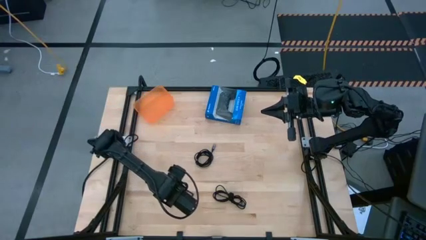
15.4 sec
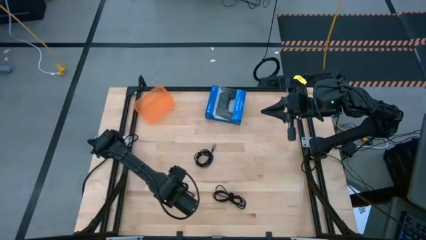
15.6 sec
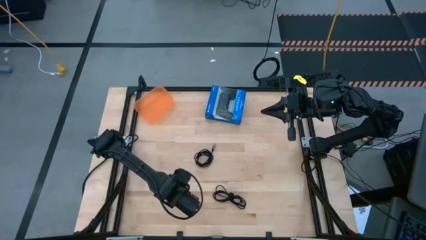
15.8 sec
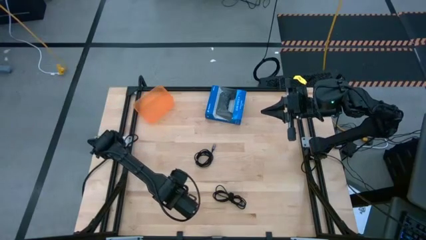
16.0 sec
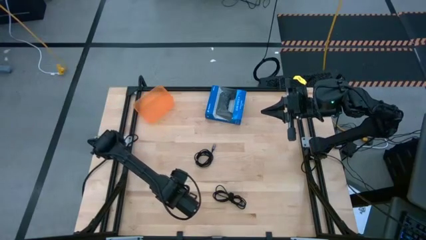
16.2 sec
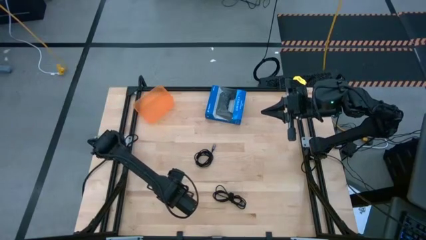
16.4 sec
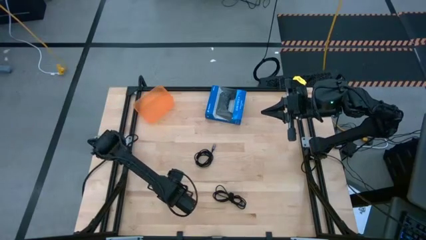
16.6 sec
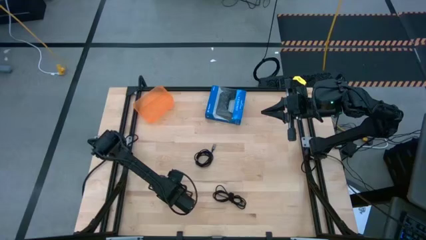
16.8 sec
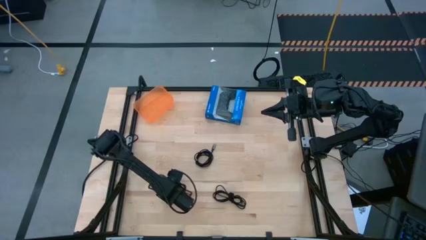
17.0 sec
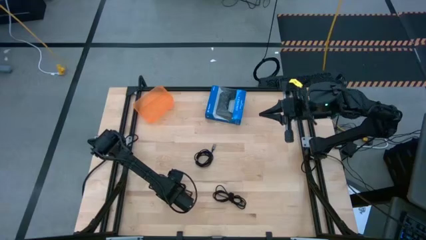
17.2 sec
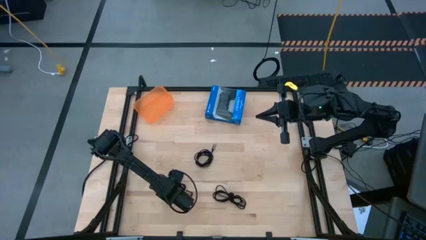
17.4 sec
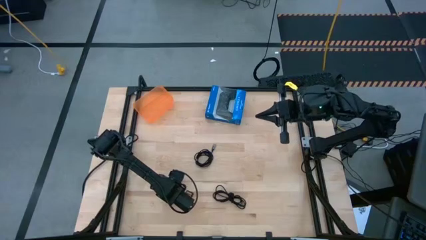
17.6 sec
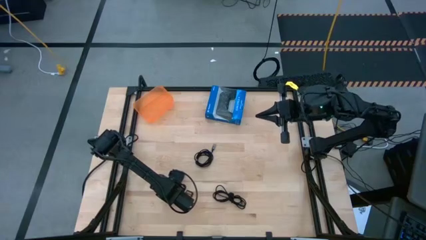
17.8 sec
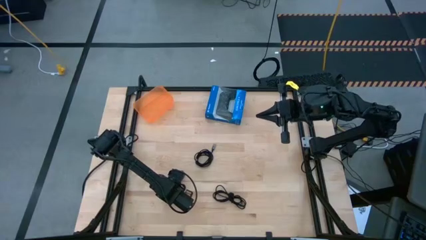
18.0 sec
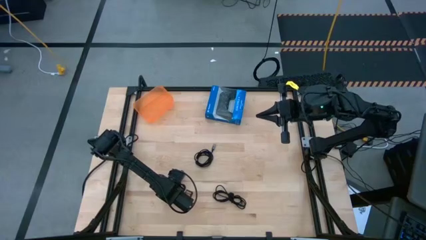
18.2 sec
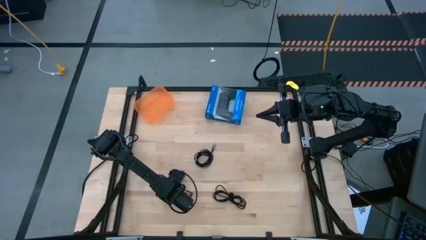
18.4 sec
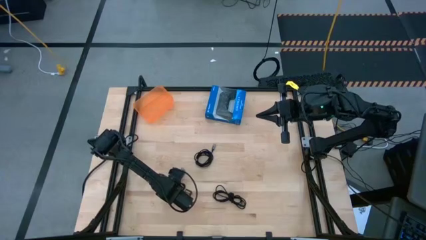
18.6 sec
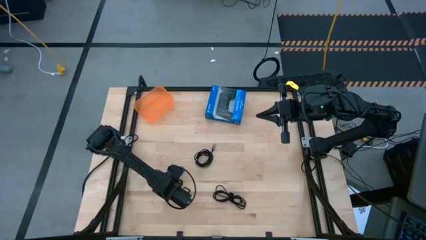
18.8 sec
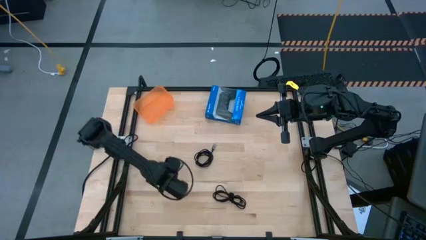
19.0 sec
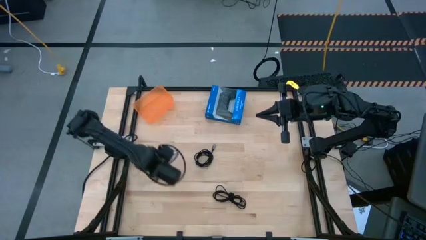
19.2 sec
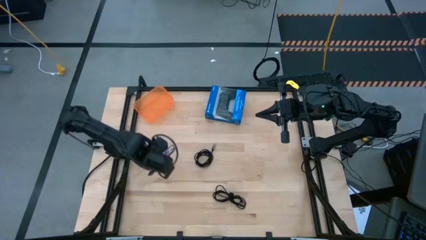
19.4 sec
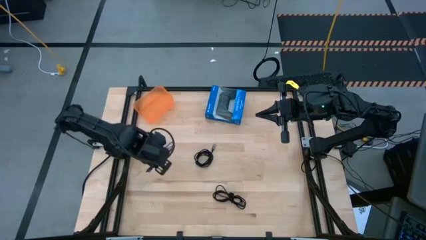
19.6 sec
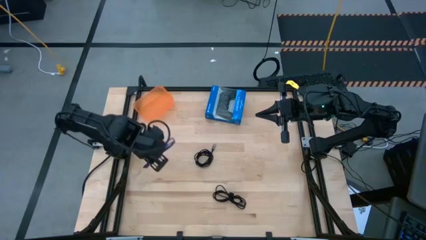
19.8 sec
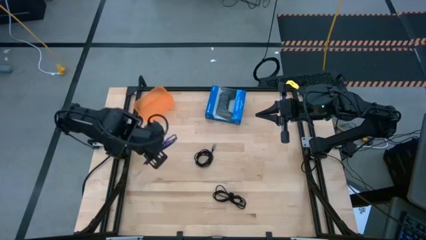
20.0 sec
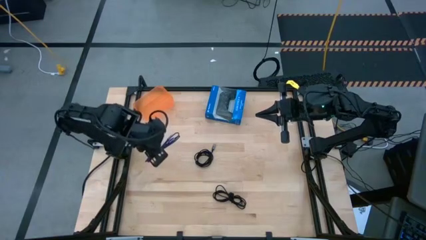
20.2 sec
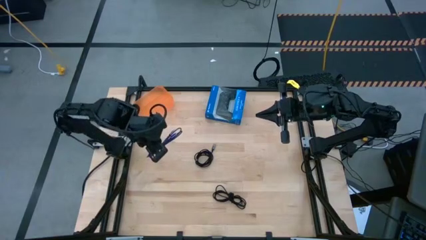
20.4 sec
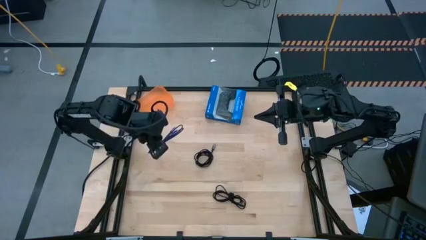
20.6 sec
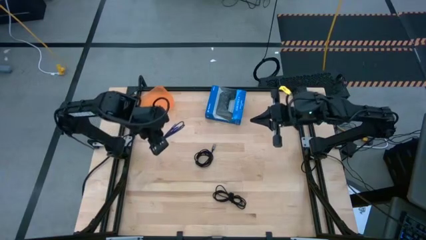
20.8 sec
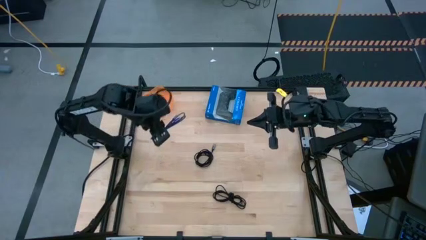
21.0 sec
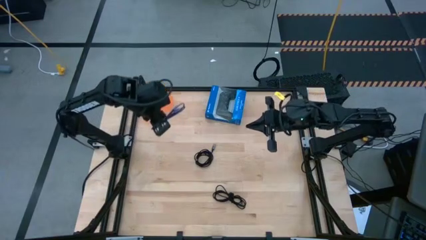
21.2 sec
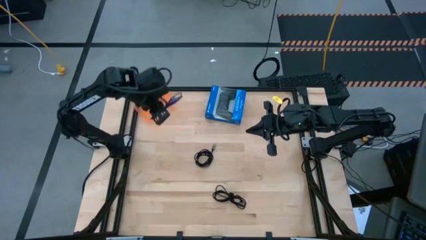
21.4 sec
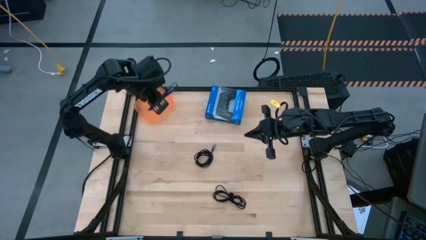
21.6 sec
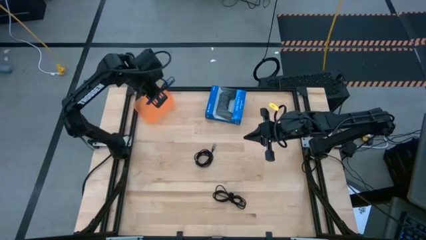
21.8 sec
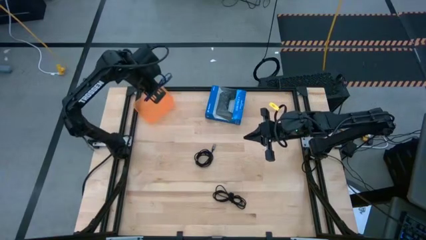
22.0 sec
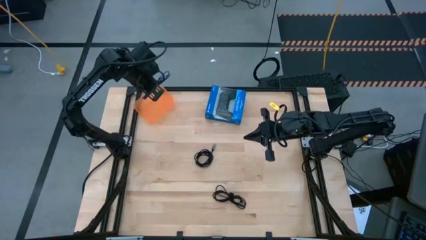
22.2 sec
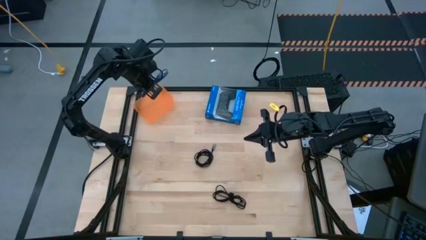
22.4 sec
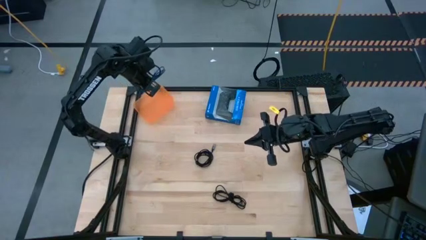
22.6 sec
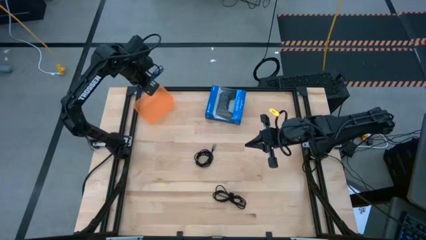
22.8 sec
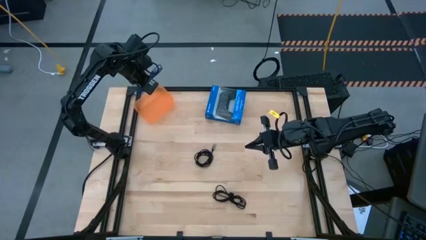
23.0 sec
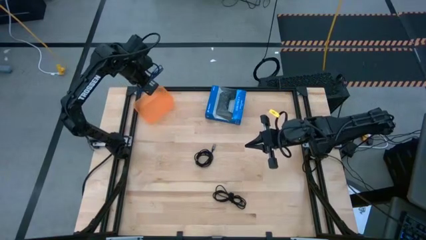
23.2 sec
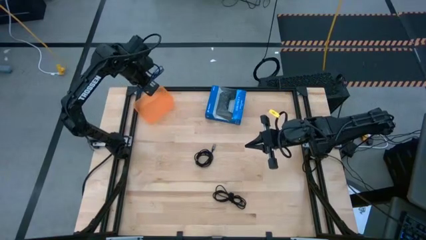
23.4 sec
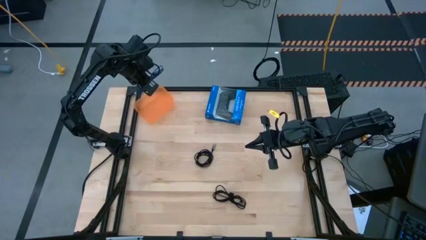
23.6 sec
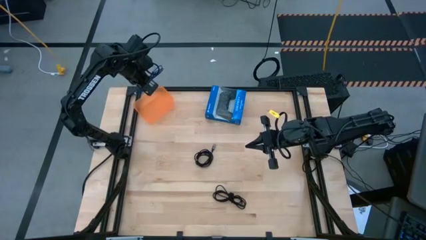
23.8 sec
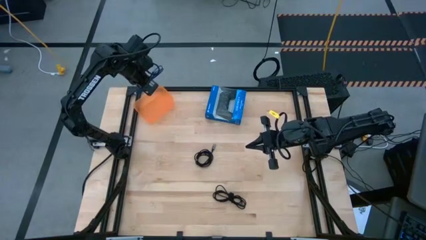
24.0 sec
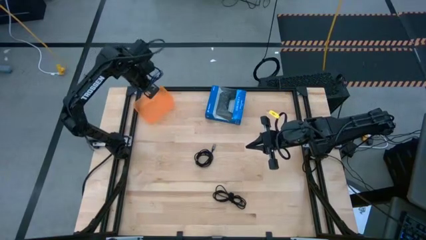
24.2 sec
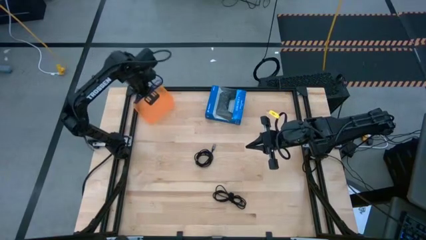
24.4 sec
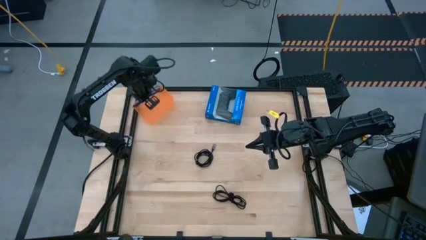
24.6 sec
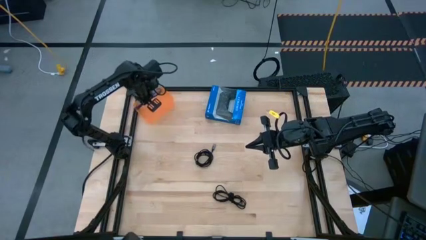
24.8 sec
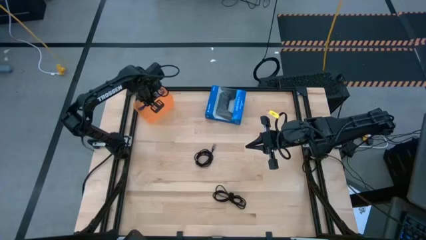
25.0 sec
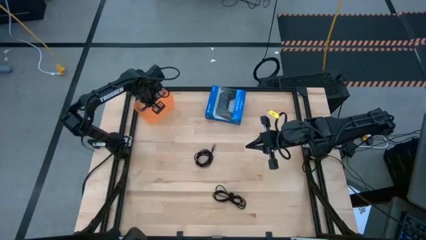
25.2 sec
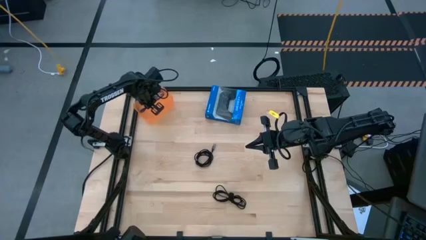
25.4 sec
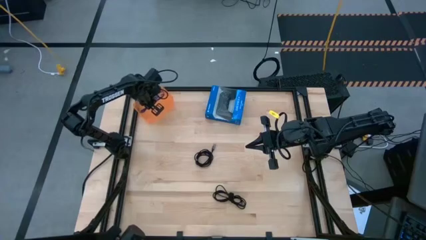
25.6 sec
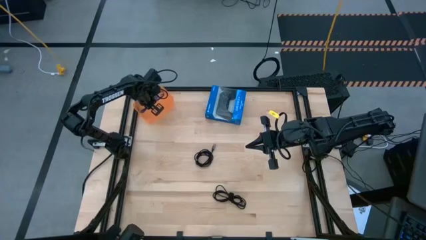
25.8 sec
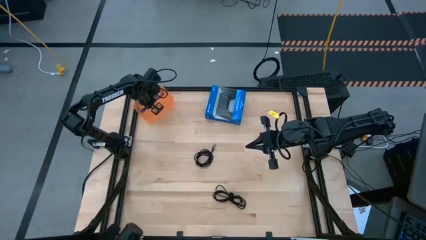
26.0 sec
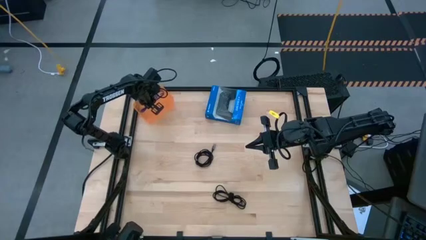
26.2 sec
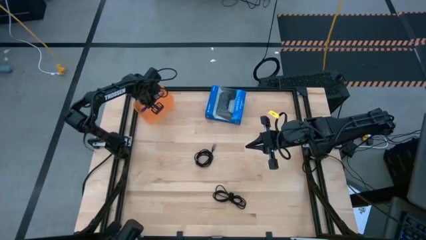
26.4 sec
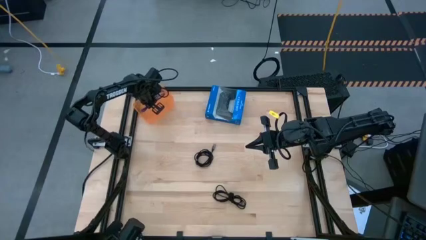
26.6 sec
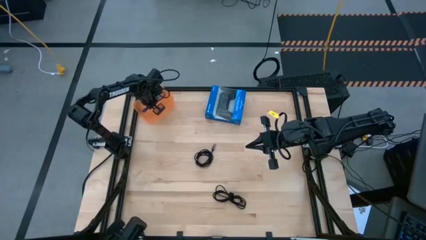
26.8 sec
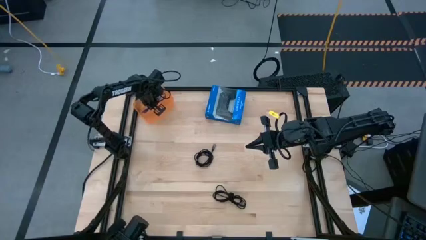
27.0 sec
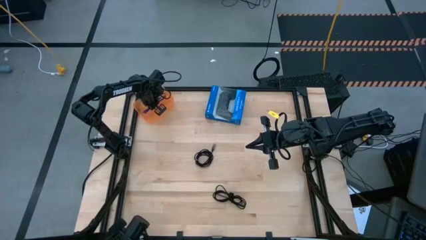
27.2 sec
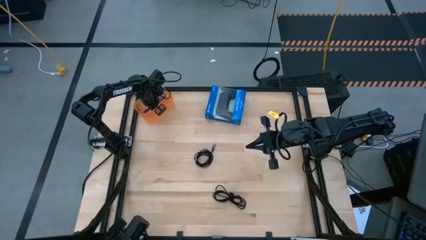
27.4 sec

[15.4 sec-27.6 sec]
Task: Pick and place USB-C Cables
Put the blue charger cable into the orange bin

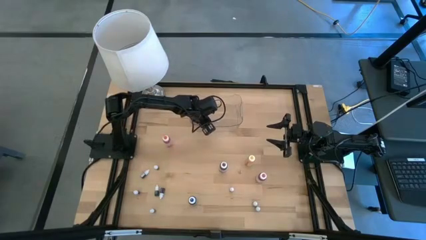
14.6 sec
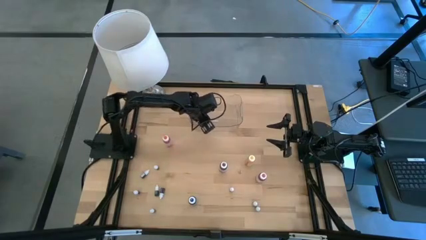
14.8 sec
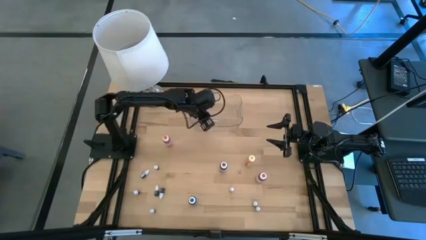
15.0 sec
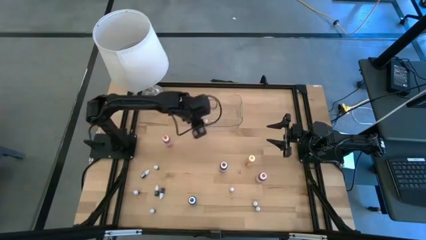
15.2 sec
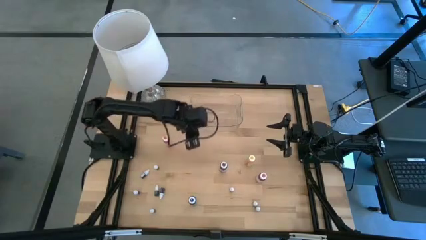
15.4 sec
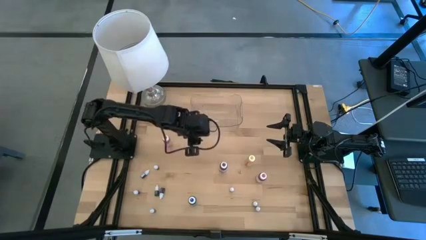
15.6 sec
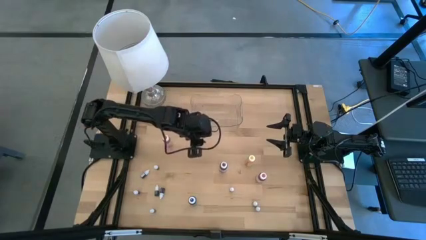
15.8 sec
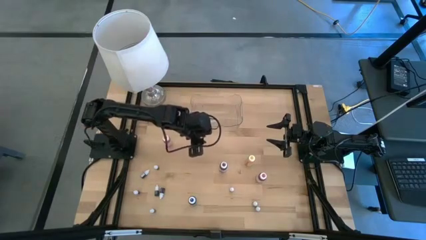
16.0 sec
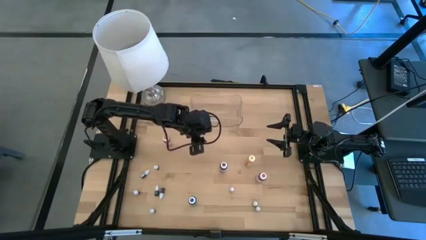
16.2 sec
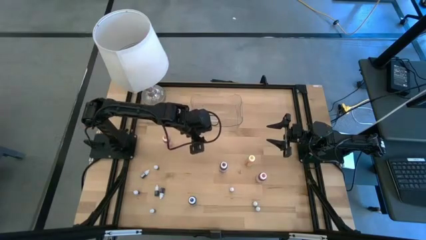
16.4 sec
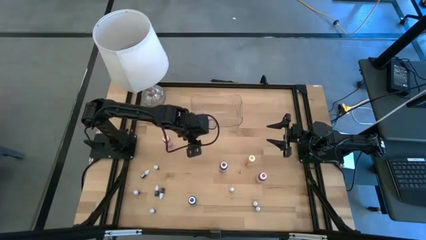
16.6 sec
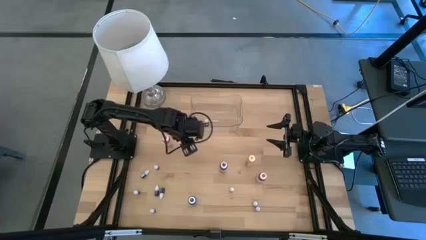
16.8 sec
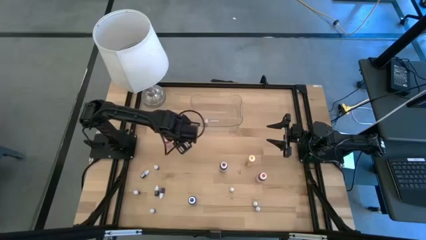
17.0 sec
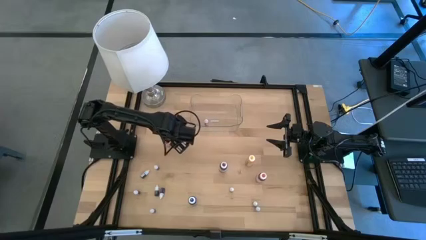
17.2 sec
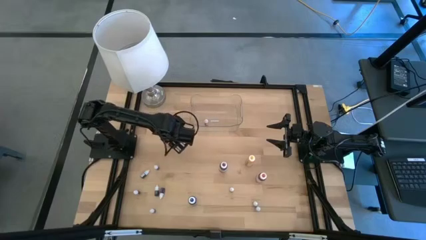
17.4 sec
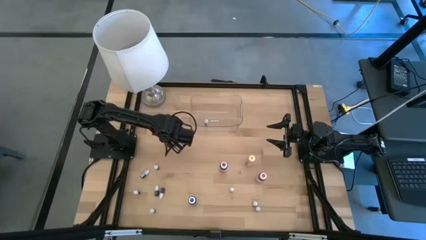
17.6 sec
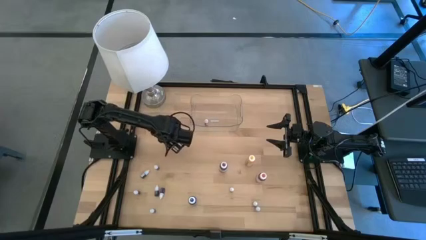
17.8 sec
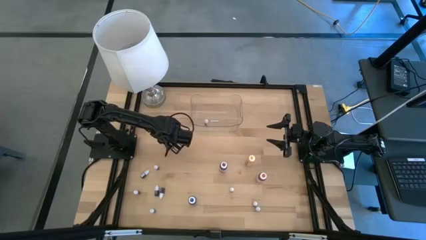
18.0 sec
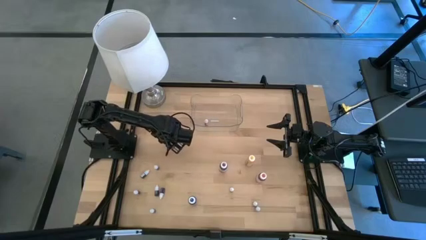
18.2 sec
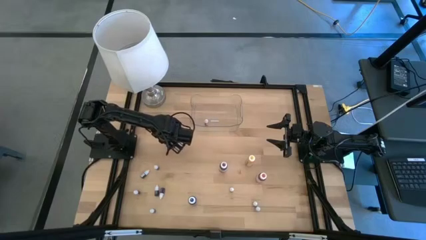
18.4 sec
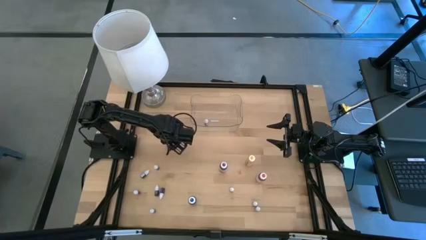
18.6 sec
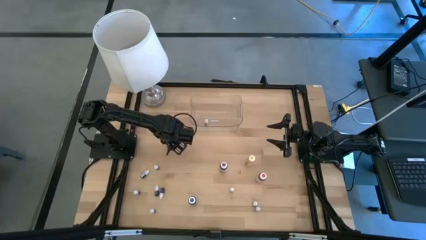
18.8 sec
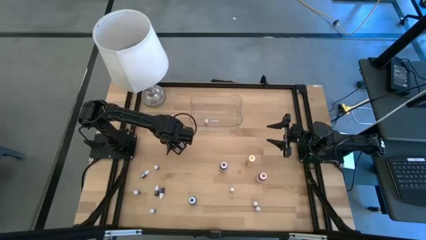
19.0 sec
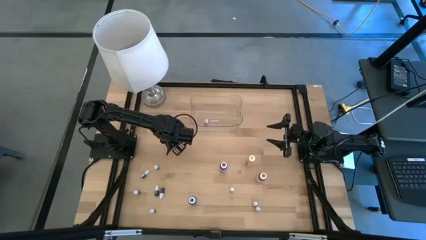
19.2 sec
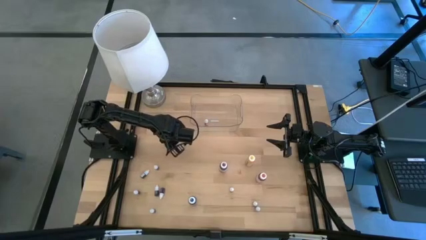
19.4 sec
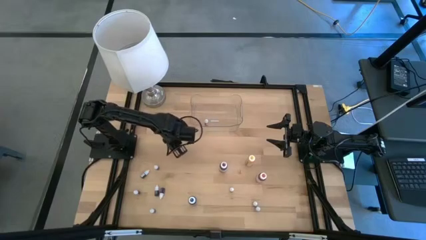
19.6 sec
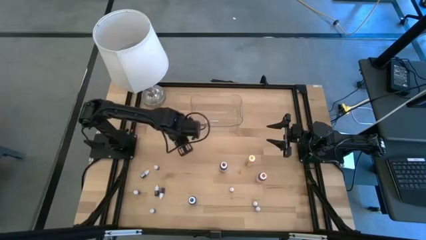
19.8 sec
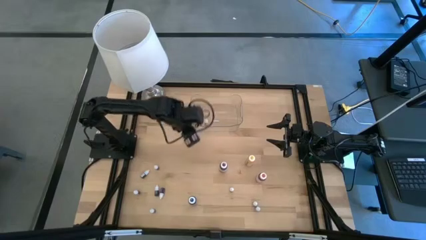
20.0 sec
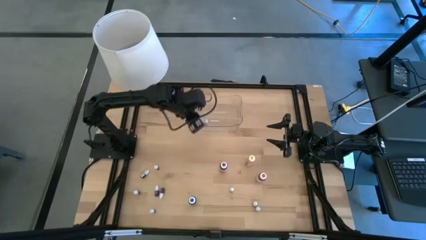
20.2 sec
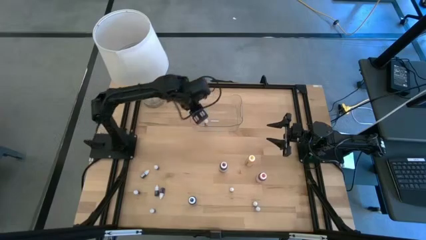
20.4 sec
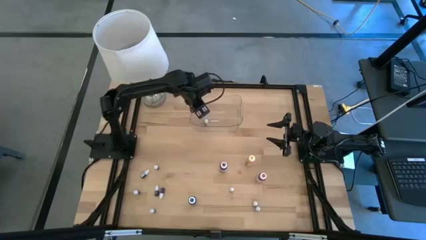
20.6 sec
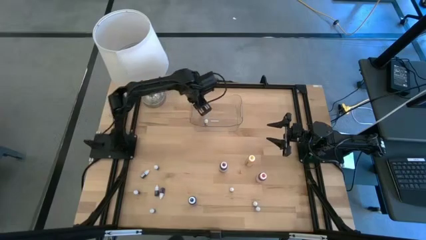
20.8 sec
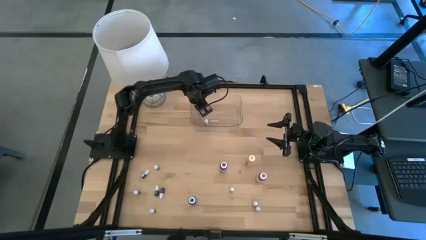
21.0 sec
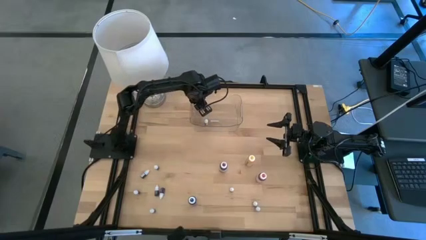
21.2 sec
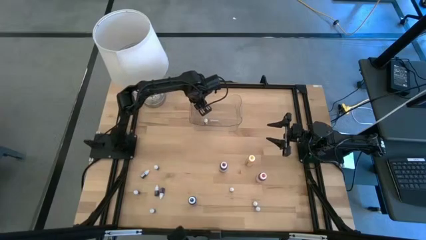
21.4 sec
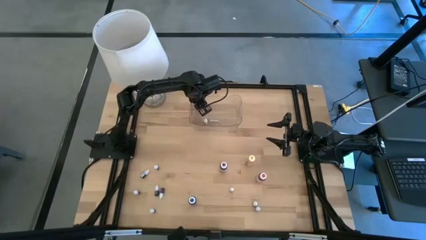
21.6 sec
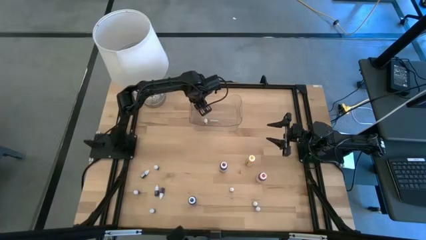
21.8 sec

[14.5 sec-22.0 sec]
Task: Pick & Place food coloring
Put the large orange food coloring bottle into the transparent bin
